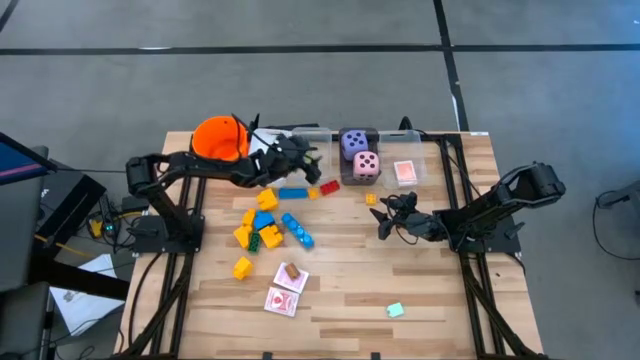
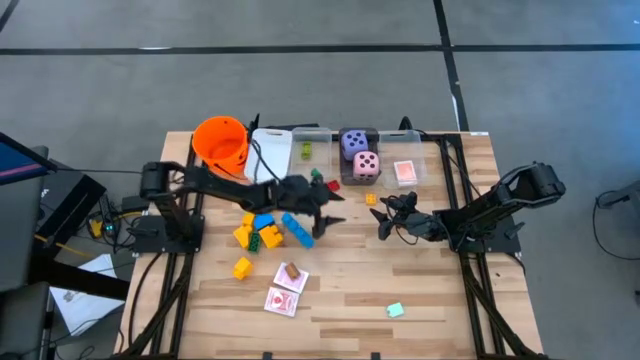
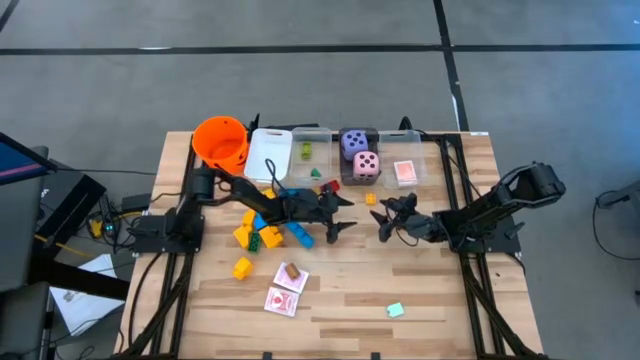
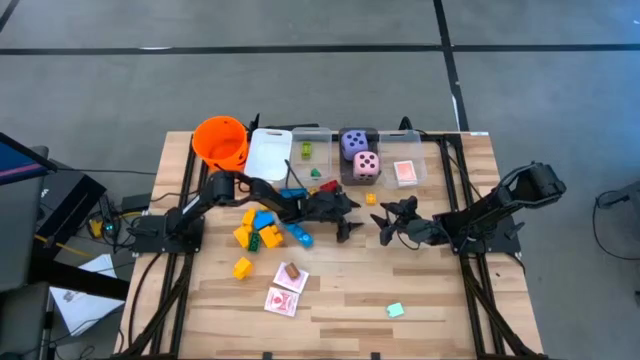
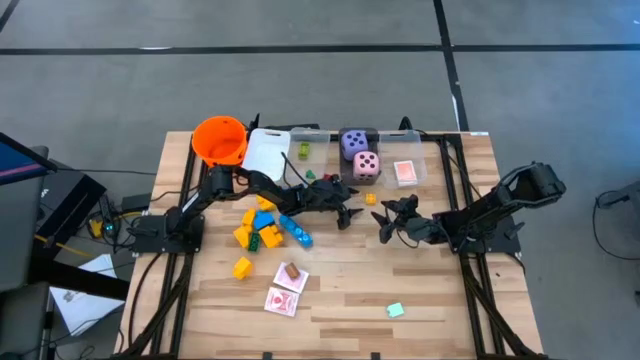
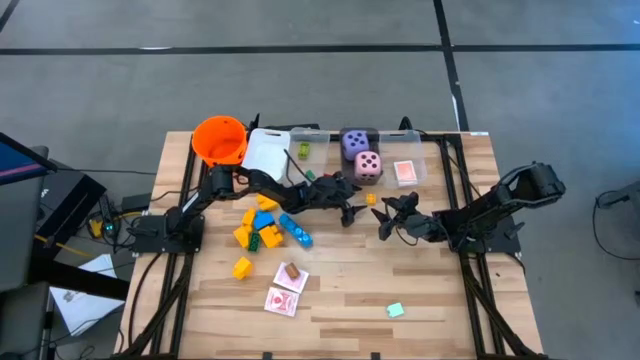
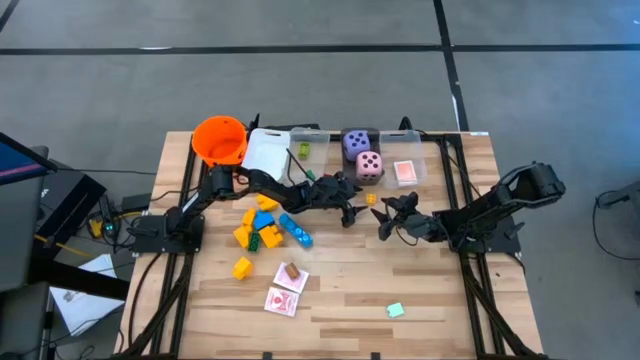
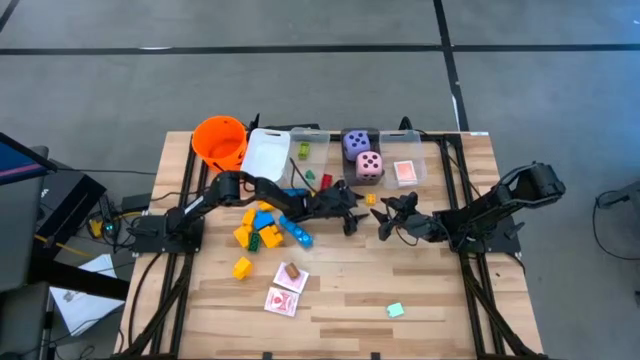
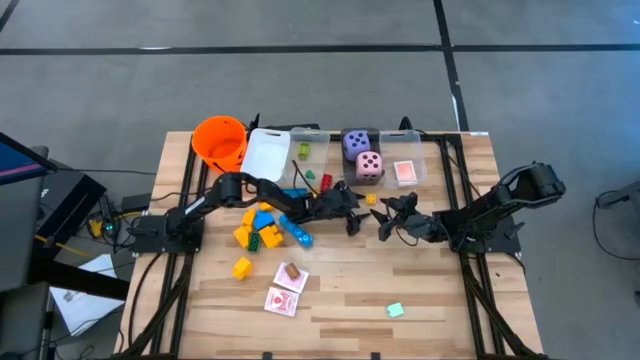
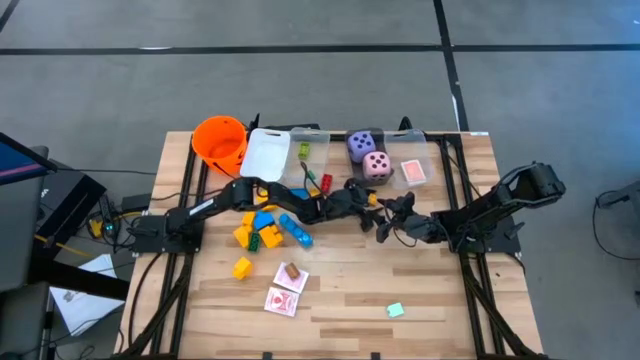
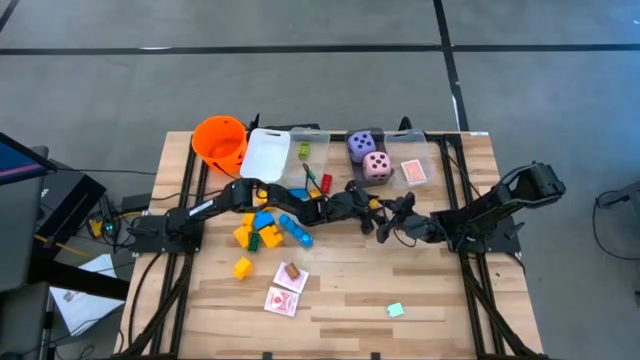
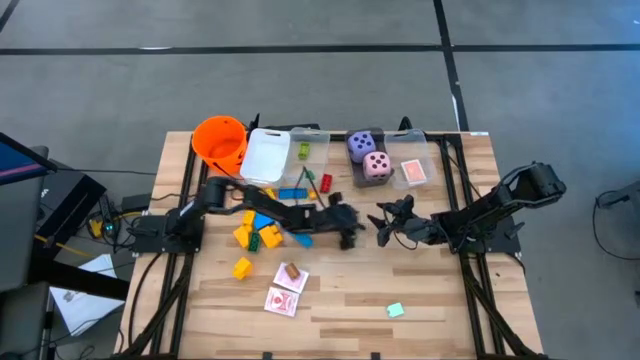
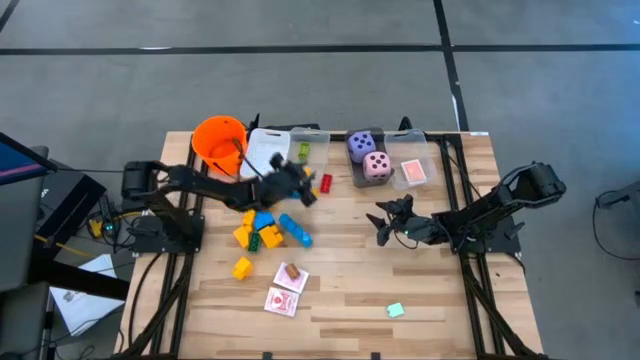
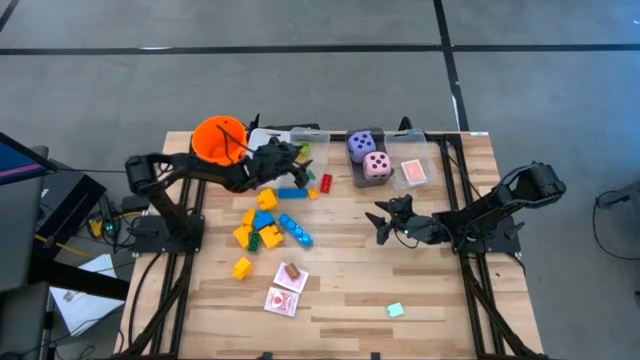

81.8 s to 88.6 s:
Task: Pick & Place Toys
Put the small yellow game piece into the left transparent bin

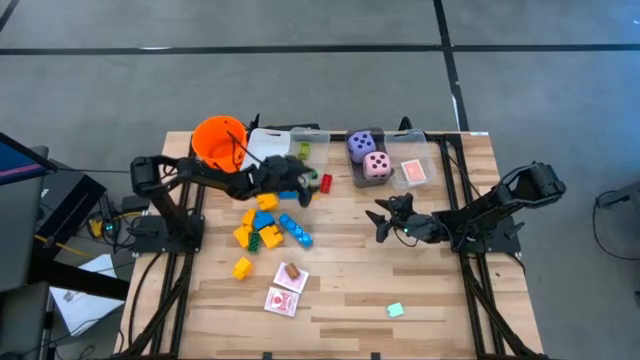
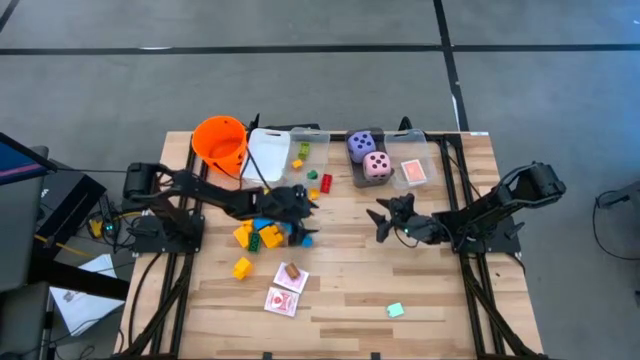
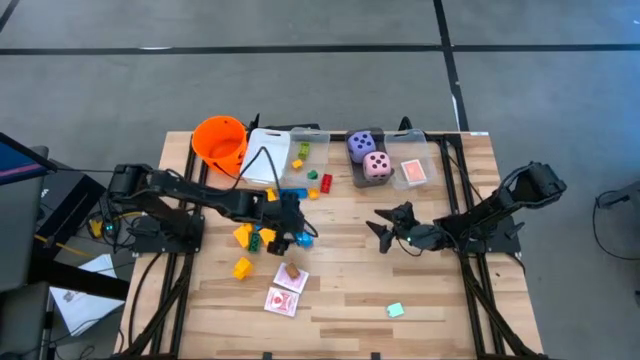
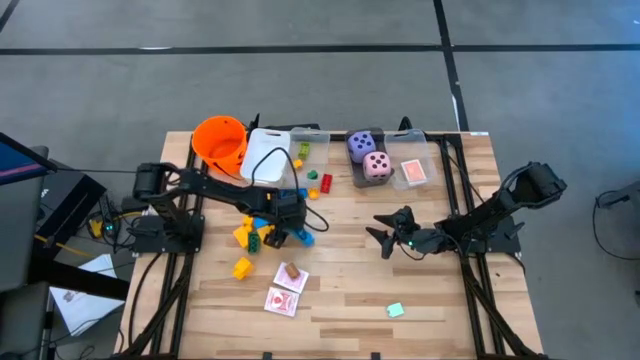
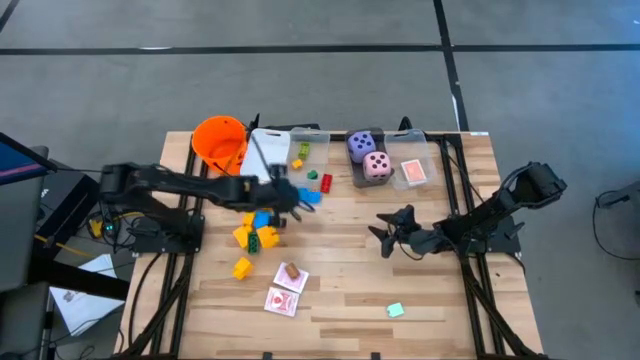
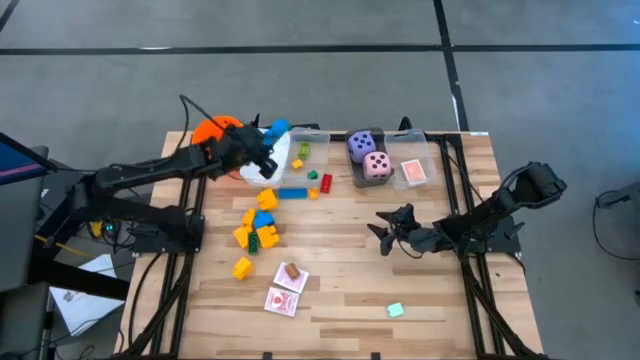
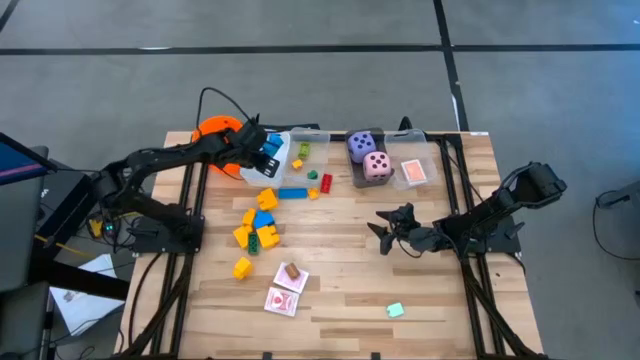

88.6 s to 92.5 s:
Put the large blue game piece into the white bin

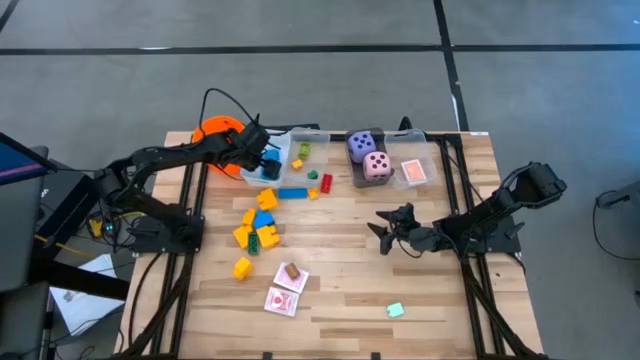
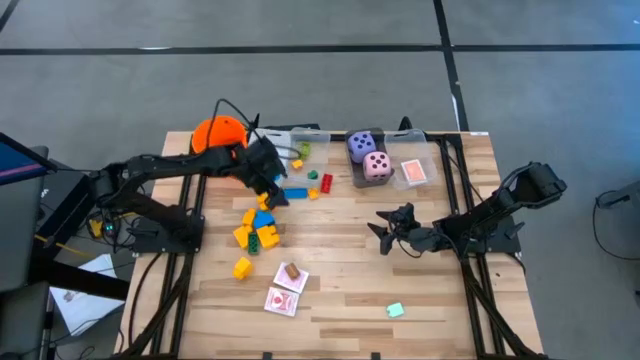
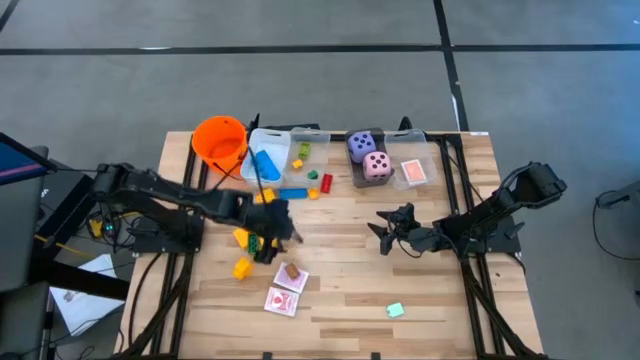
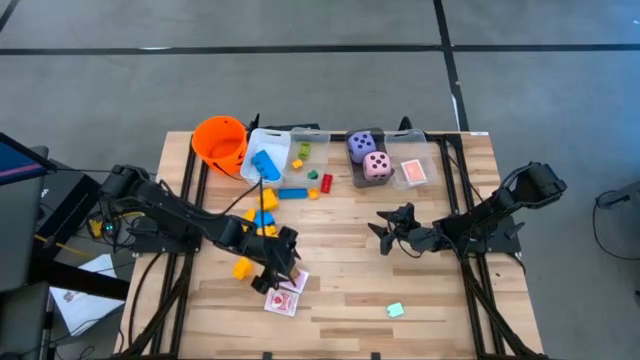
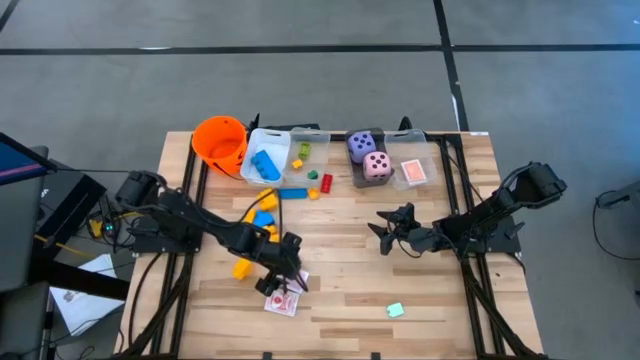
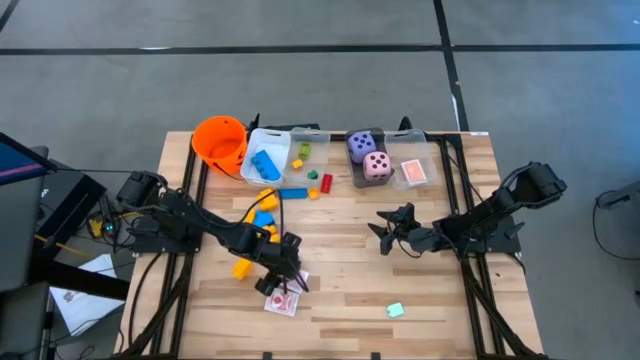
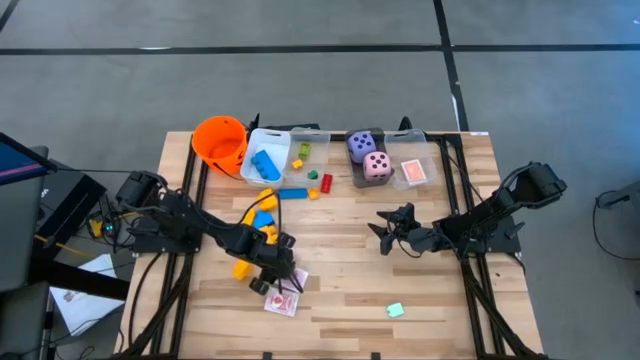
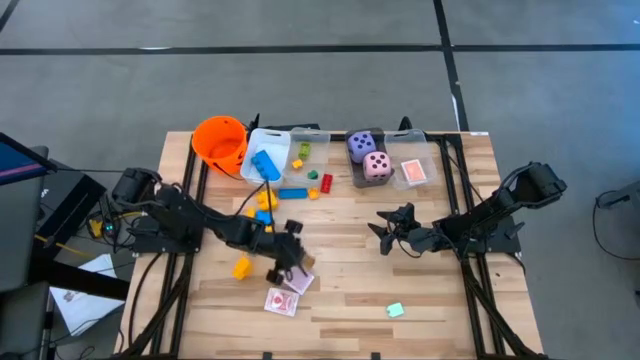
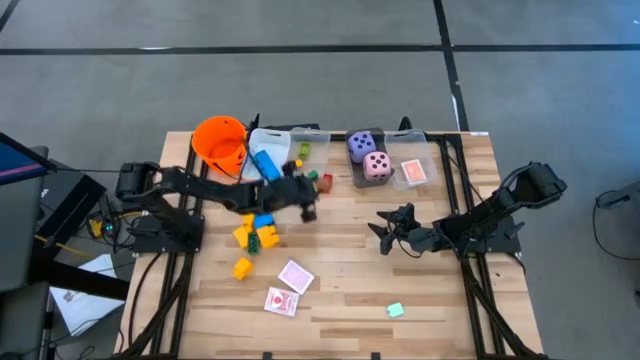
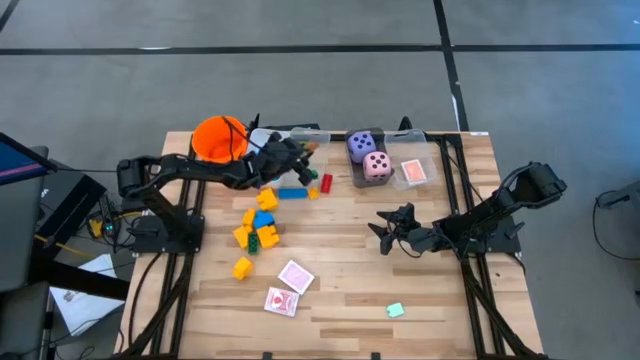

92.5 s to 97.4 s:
Put the small brown game piece into the left transparent bin

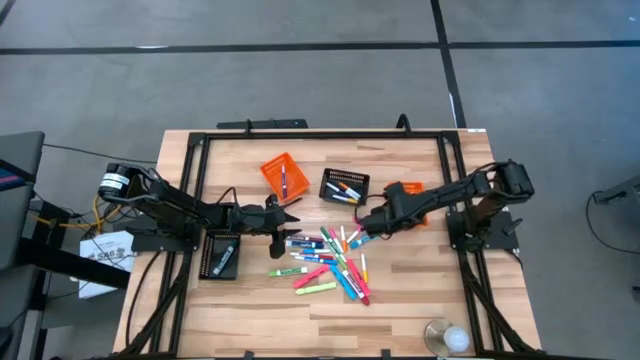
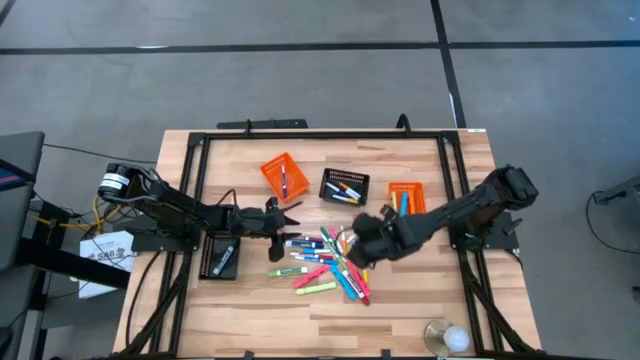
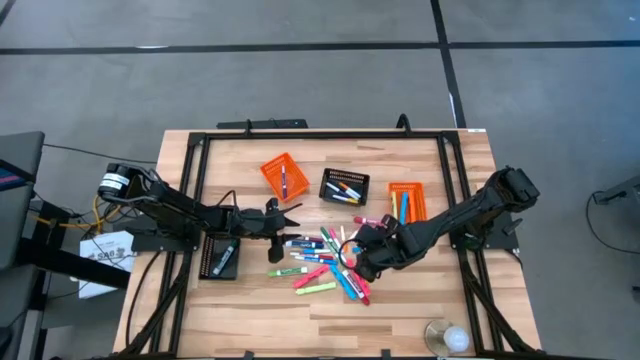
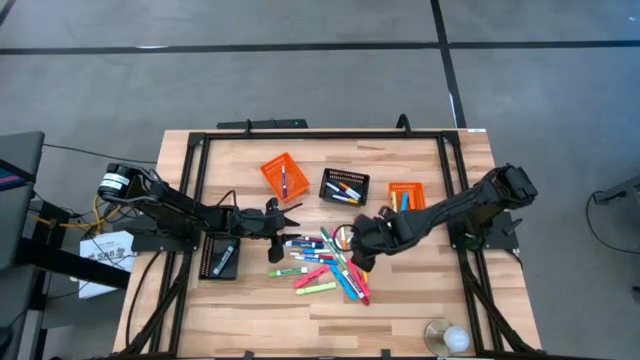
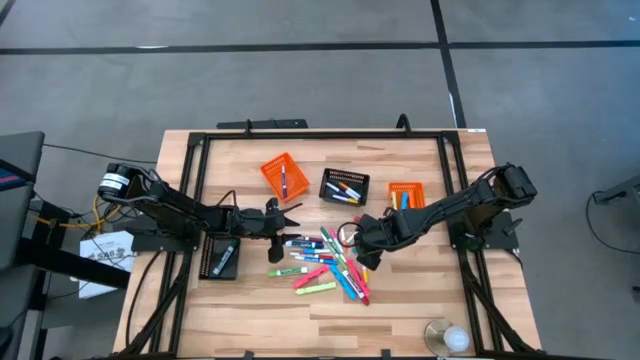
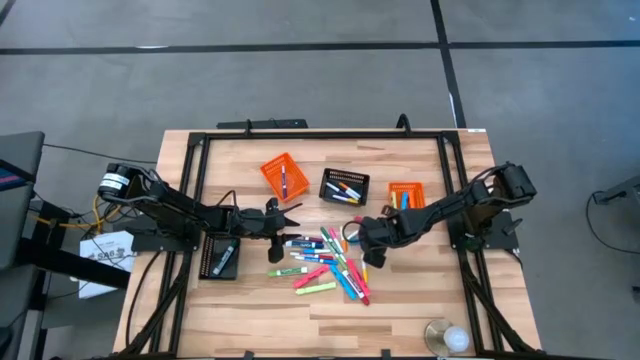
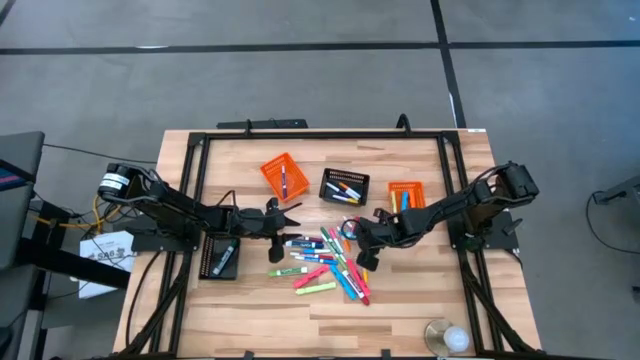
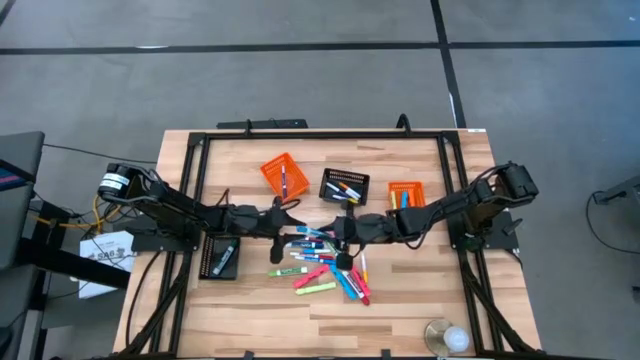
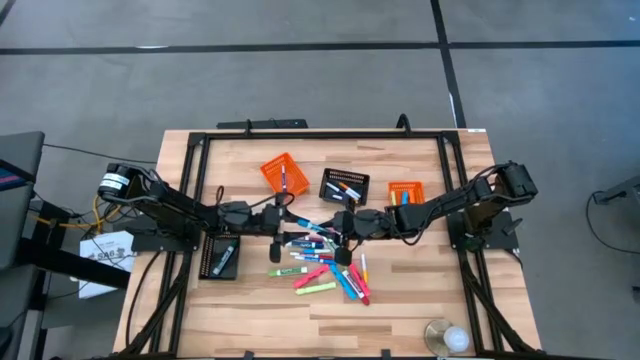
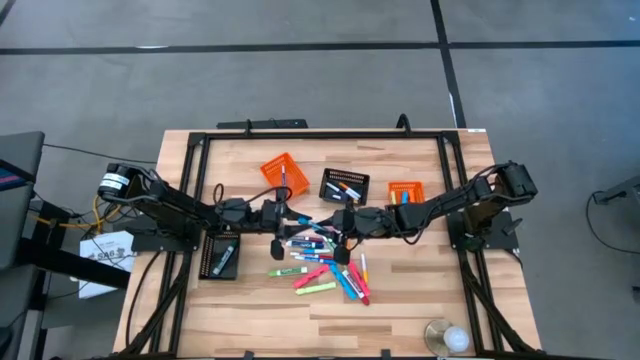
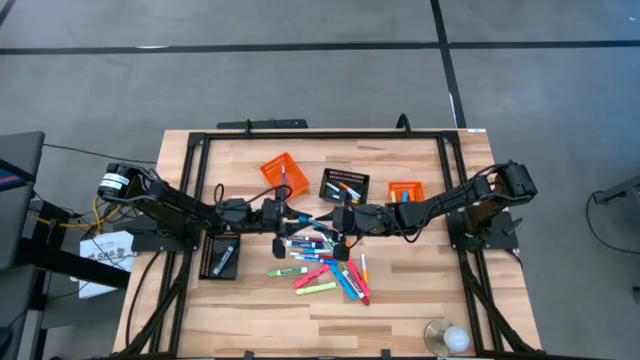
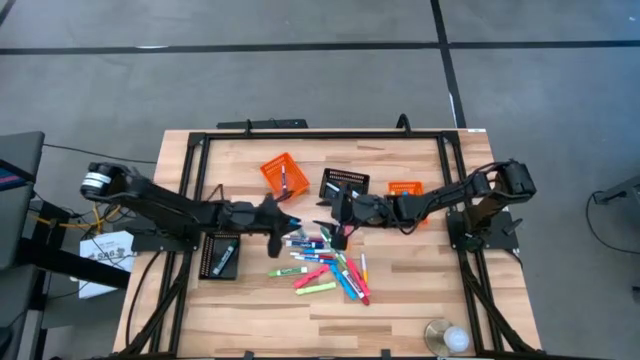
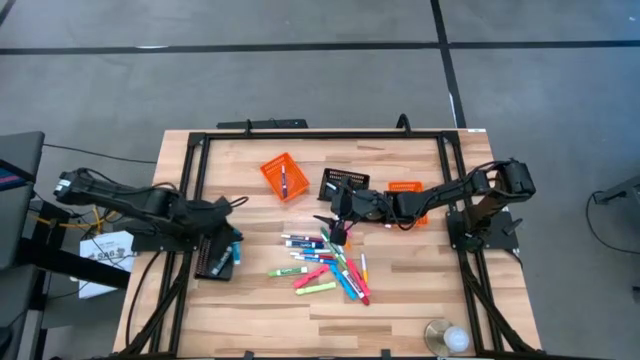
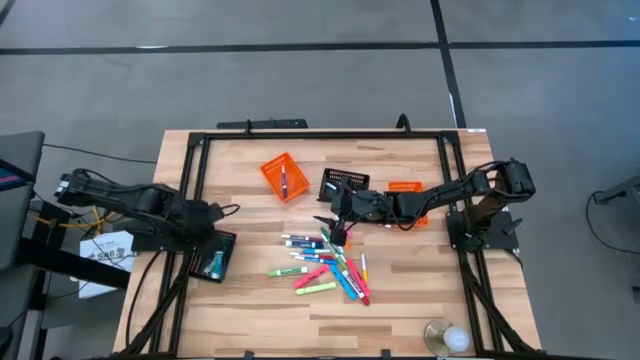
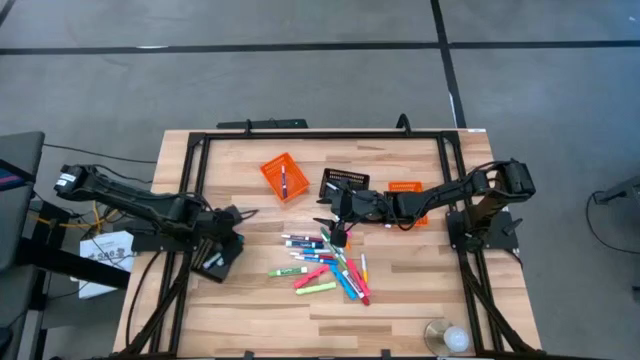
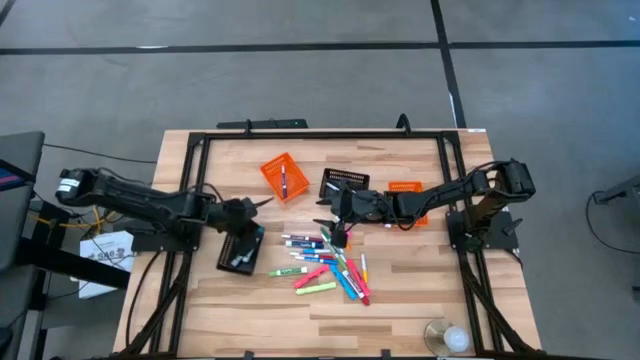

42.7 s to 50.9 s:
Task: Pick & Place Markers
Put the light blue marker into the bottom black bin
